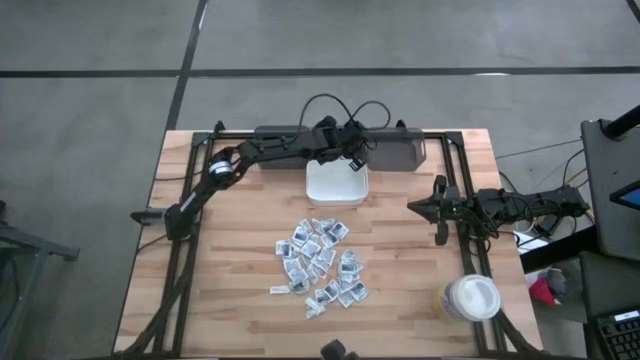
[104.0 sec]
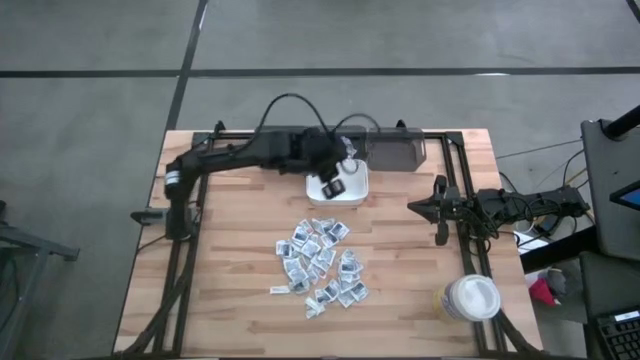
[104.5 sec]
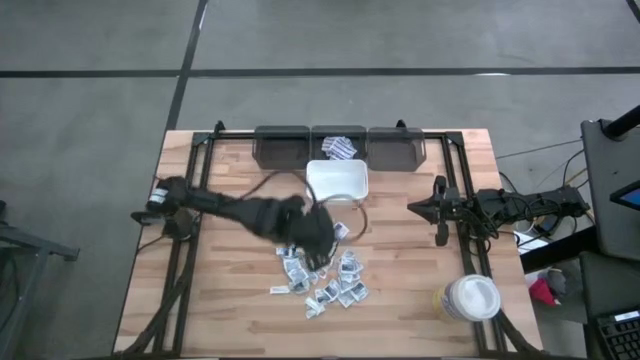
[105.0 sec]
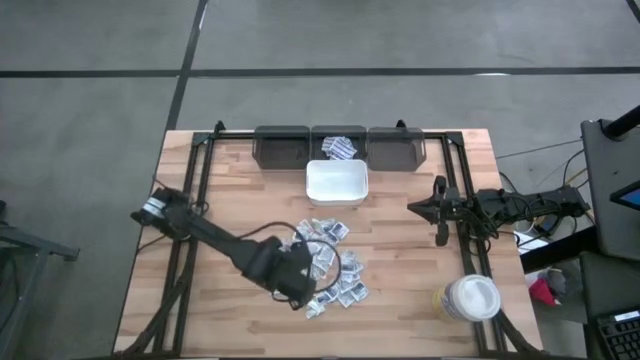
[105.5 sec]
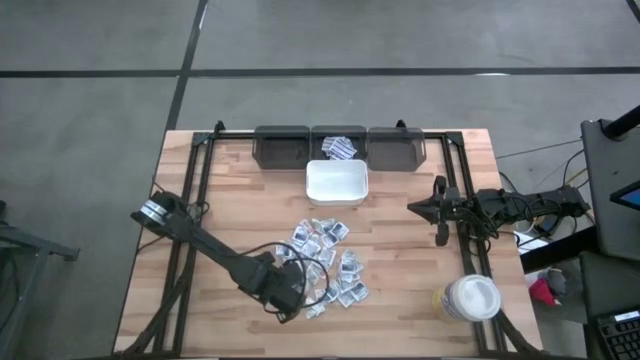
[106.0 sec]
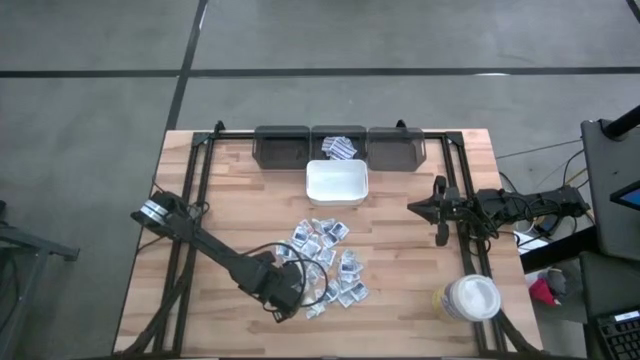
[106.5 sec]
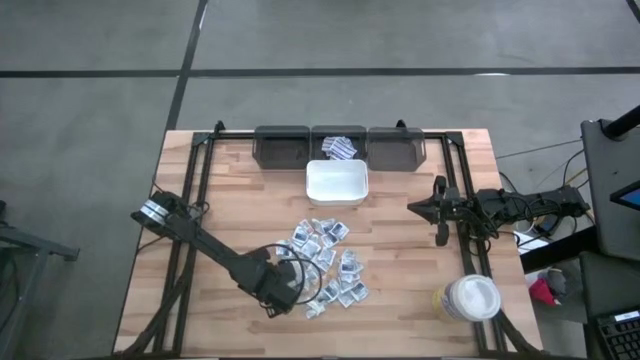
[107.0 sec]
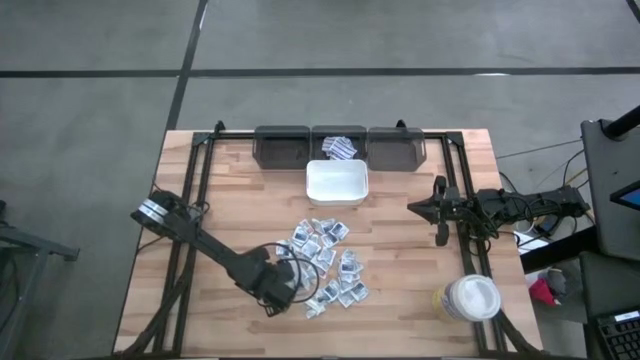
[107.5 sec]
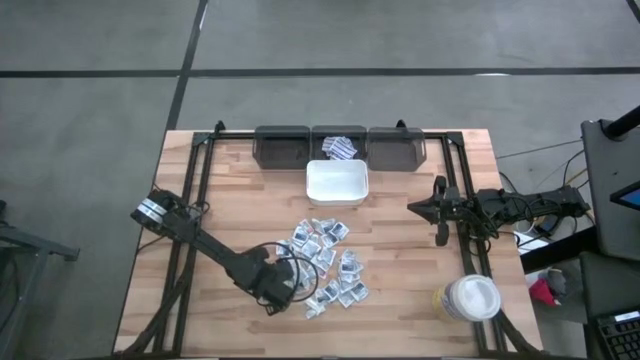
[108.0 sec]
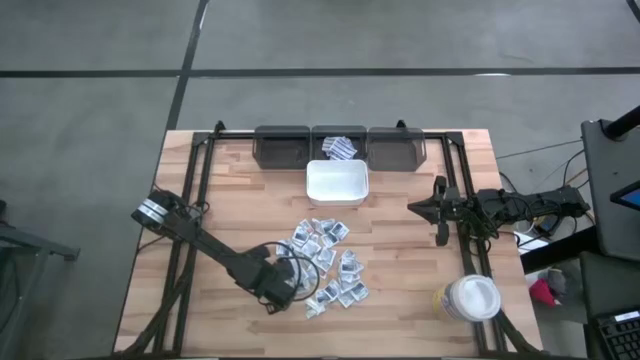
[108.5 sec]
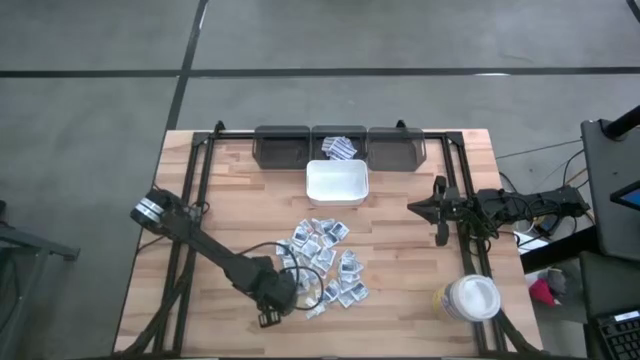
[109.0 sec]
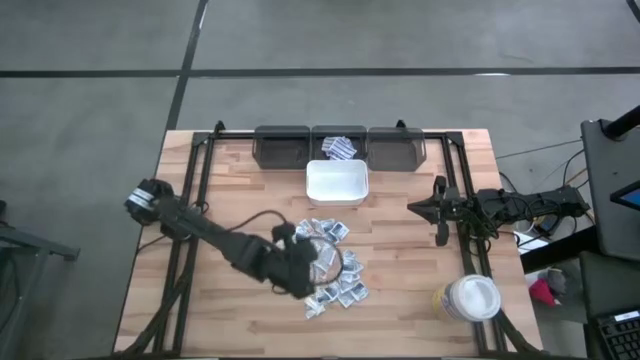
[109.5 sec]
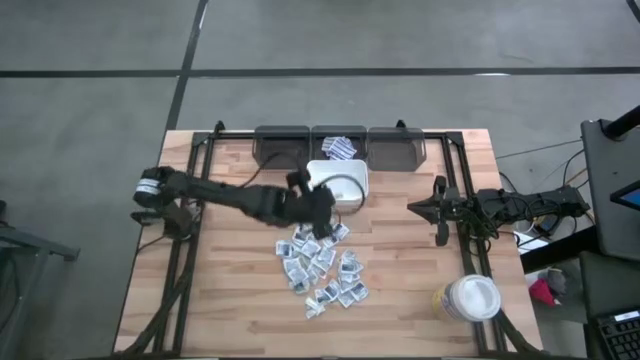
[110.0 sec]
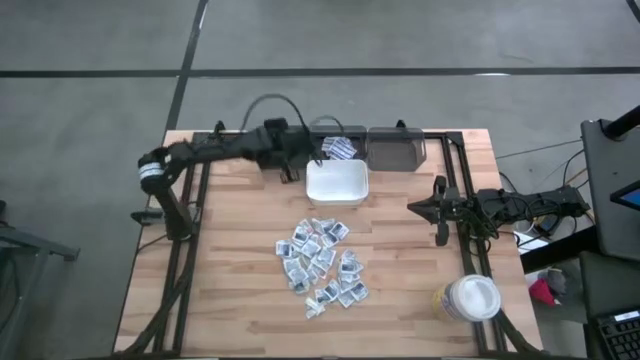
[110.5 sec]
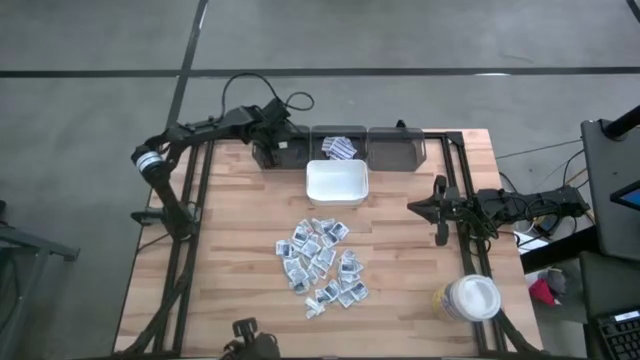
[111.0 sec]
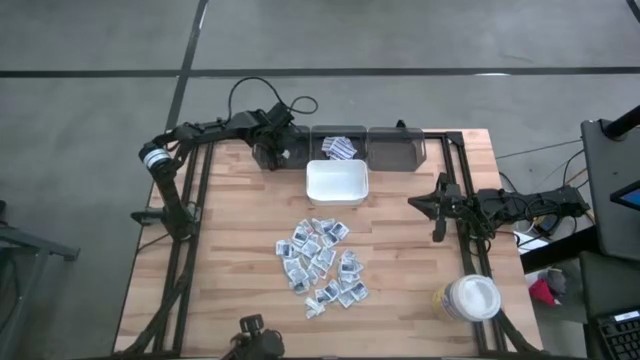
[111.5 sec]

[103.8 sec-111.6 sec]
Task: Pick & Place First Aid Supplies
Put the green bandage into the left black bin

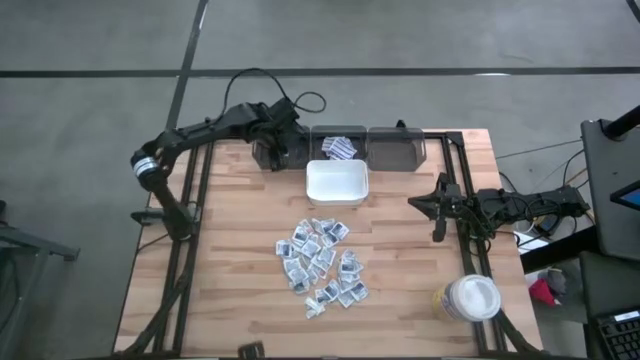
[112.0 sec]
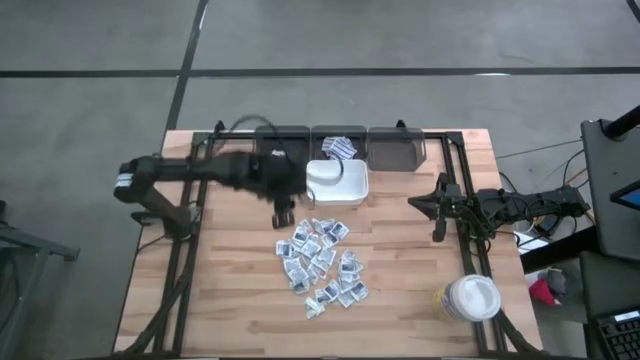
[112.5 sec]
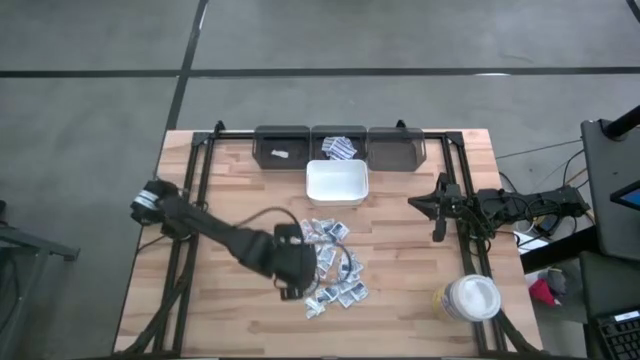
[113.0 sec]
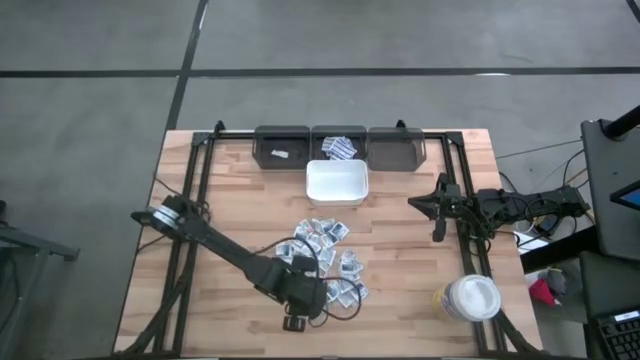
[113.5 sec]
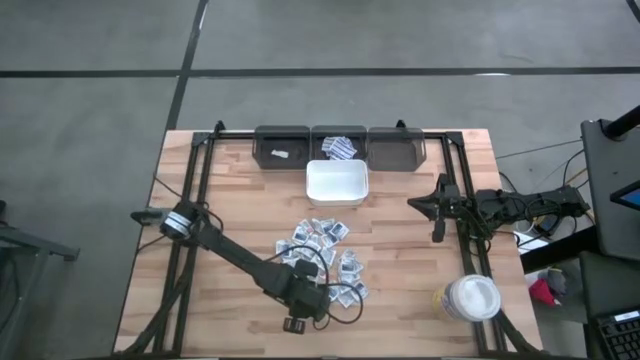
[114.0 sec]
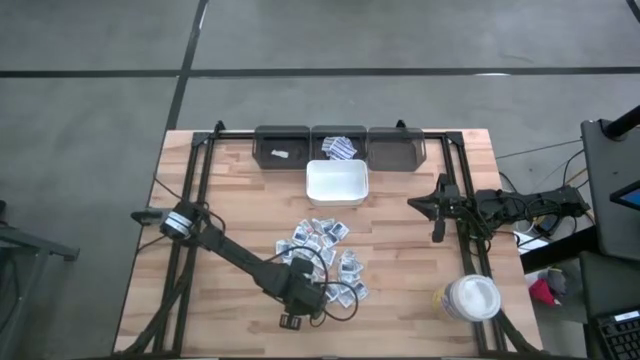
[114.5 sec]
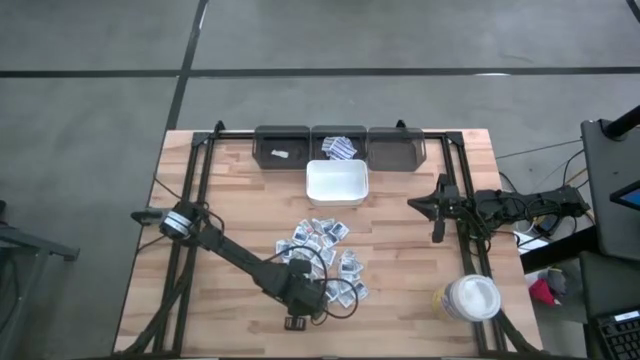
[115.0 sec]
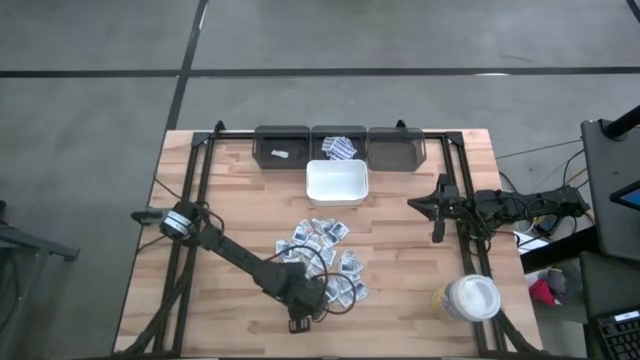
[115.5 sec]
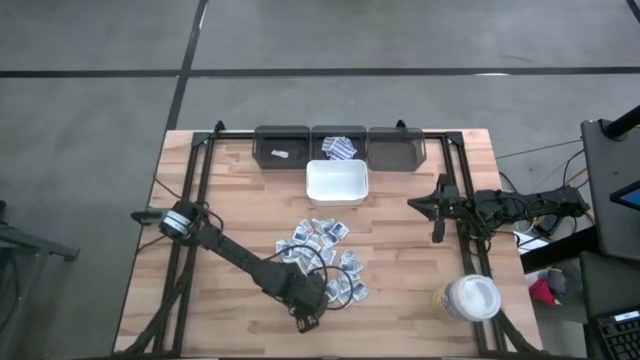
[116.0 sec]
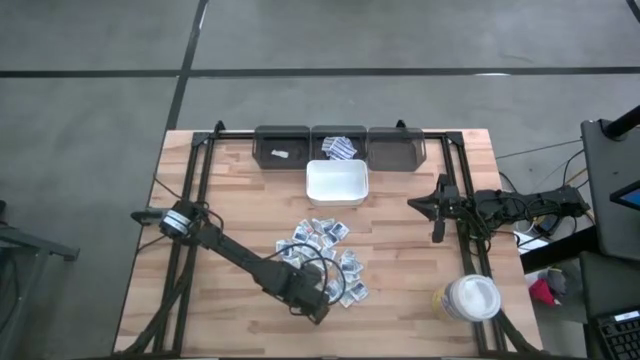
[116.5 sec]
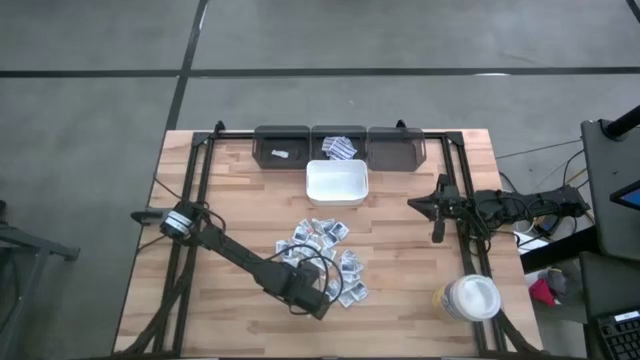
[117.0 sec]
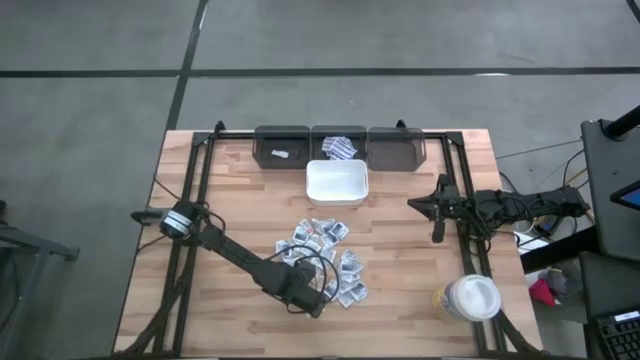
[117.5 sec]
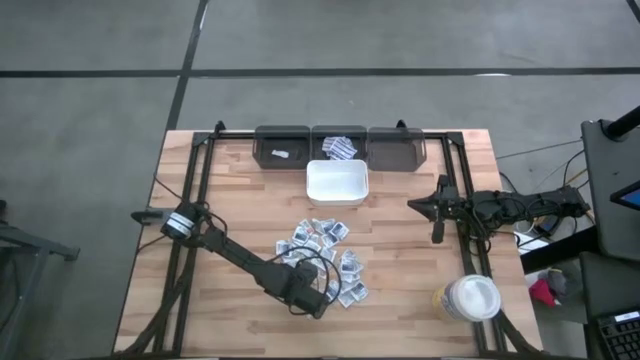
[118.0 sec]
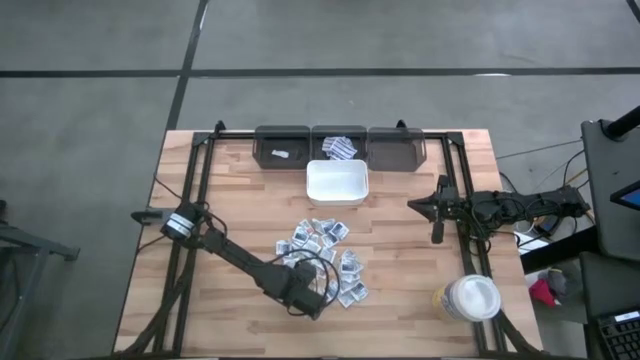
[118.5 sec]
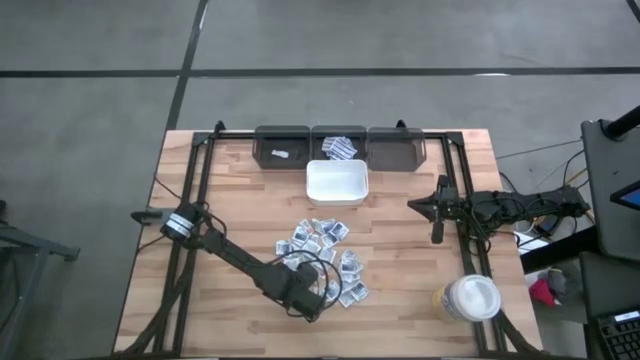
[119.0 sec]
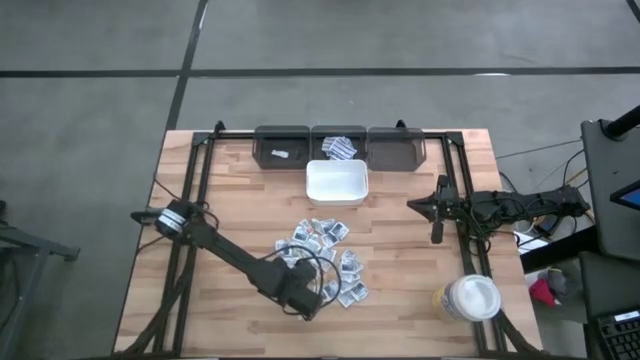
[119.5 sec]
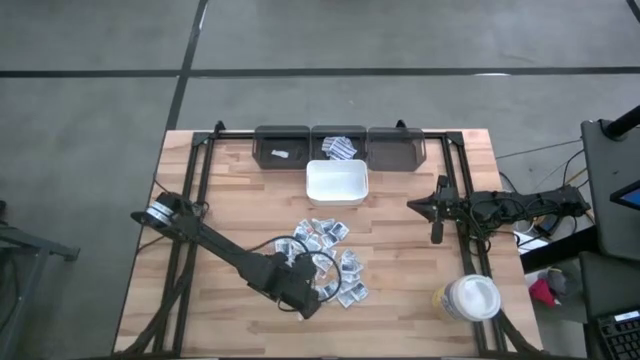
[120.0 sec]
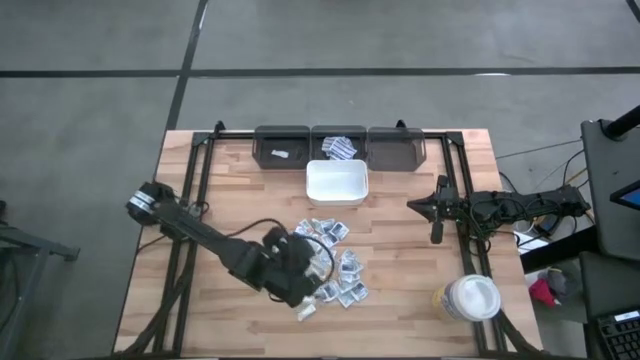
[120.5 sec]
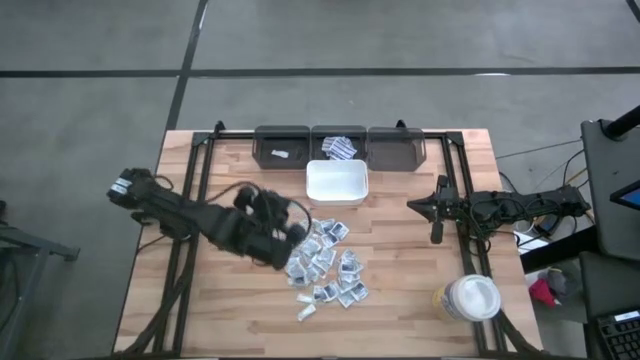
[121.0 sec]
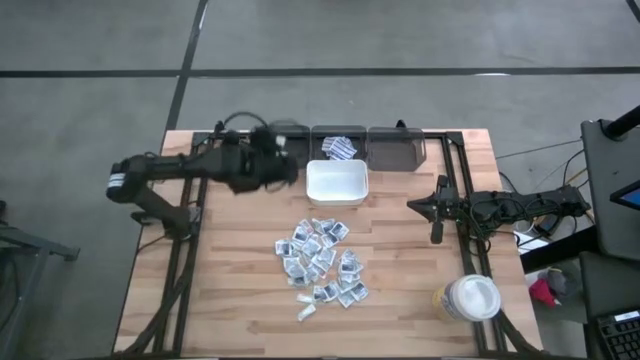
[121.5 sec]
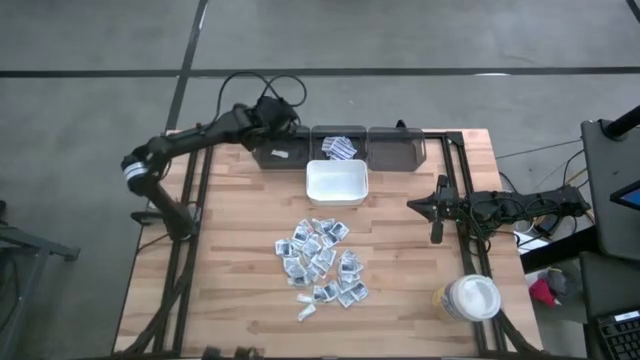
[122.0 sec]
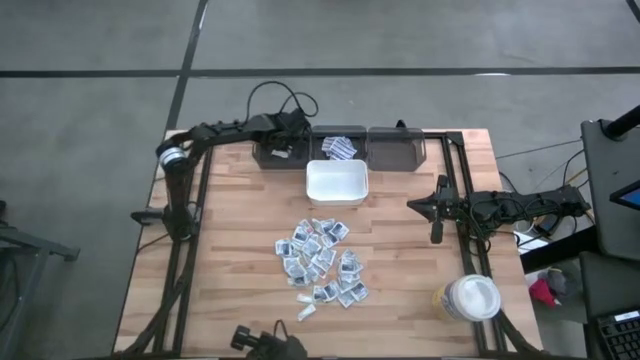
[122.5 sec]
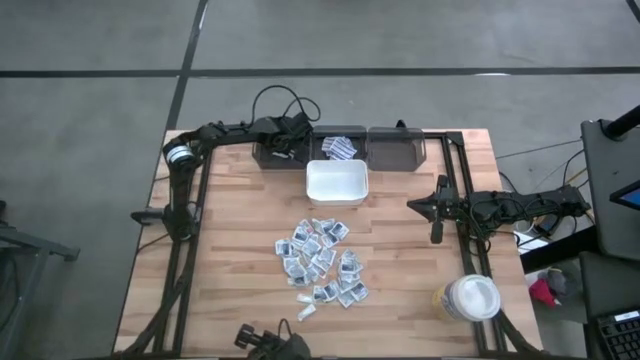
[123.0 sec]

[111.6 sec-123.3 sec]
Put the green bandage into the left black bin

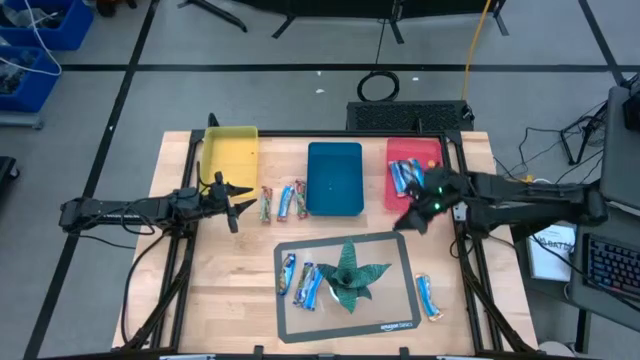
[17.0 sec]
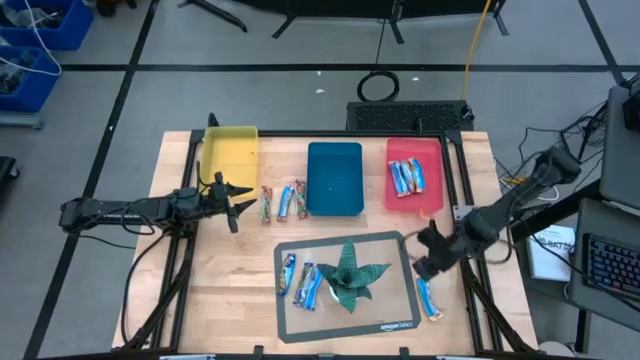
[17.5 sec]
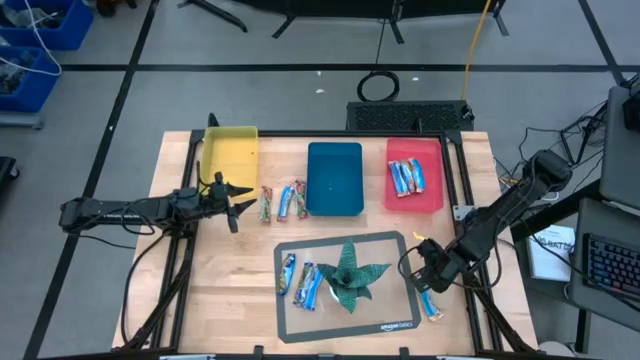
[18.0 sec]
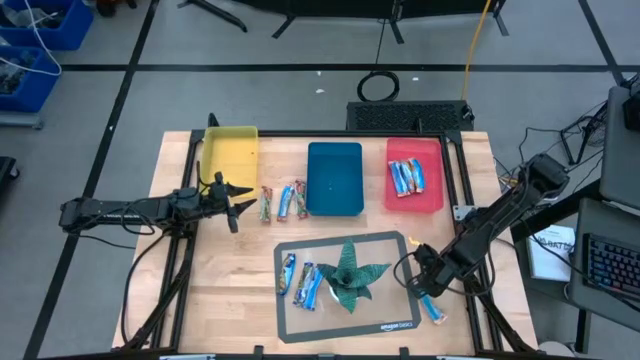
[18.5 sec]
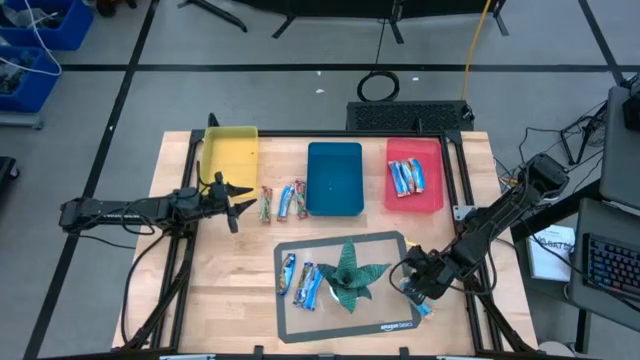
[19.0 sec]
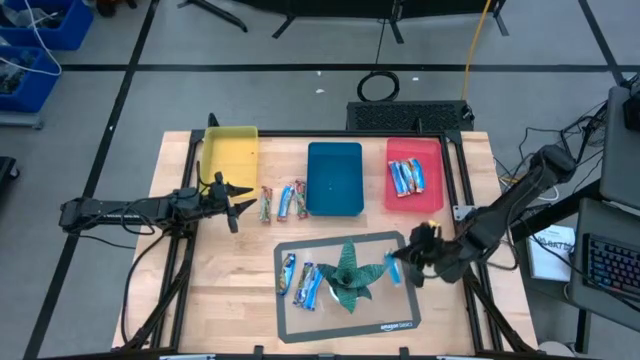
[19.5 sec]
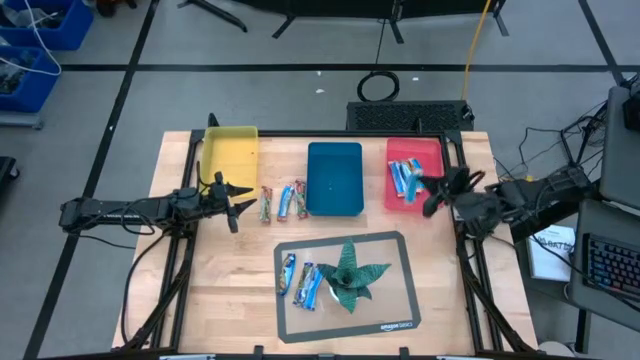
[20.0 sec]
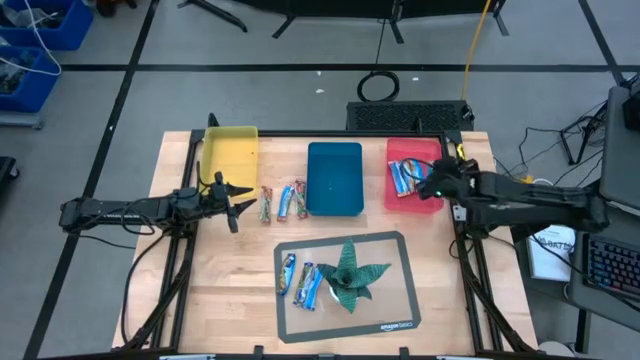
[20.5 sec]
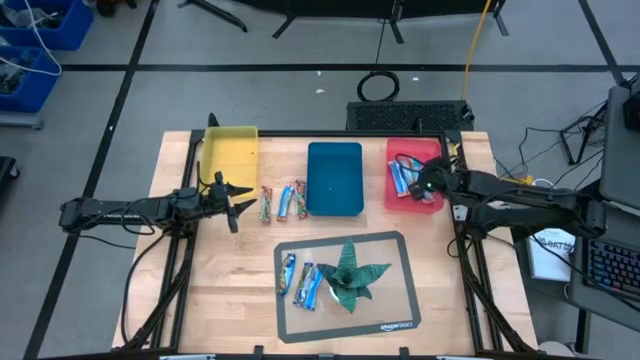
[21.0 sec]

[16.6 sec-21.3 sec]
Task: Pick and place Granola Bars by type
Put the yellow granola bar into the pink bin
